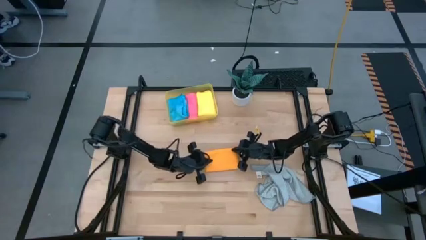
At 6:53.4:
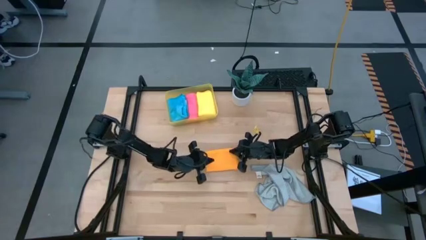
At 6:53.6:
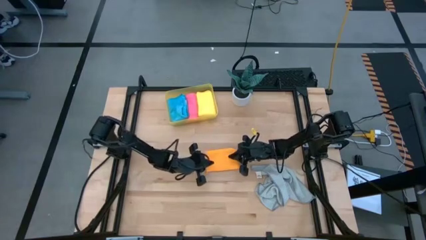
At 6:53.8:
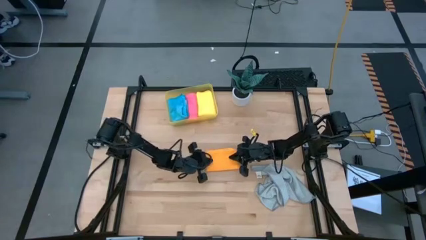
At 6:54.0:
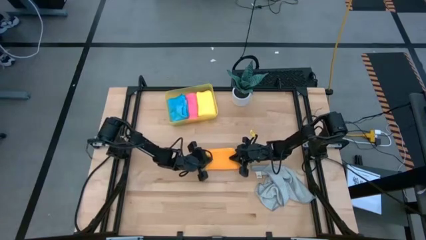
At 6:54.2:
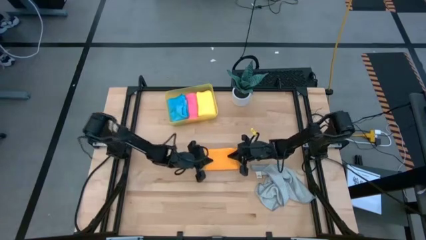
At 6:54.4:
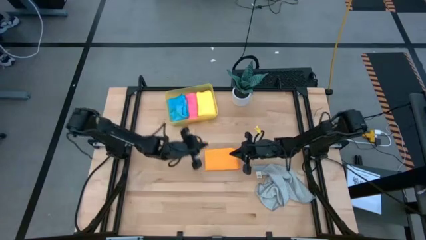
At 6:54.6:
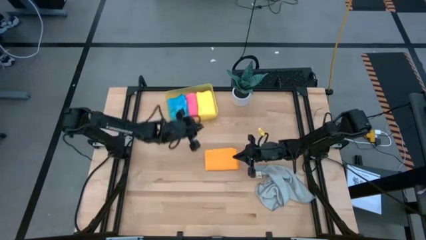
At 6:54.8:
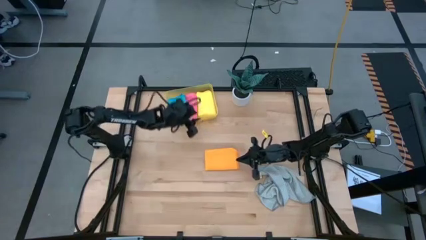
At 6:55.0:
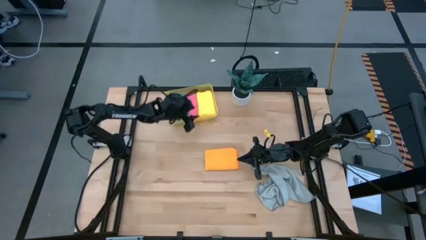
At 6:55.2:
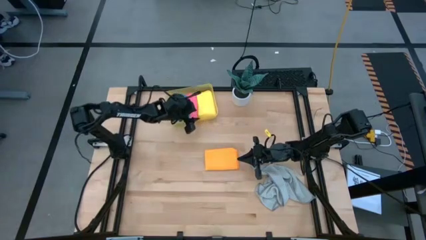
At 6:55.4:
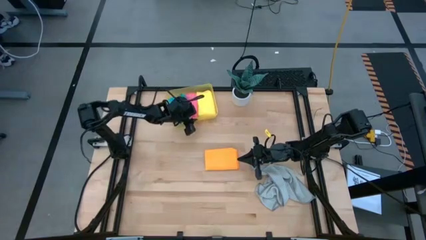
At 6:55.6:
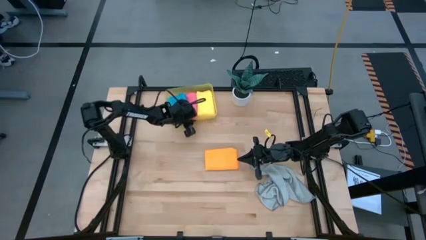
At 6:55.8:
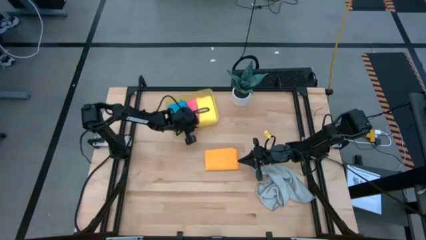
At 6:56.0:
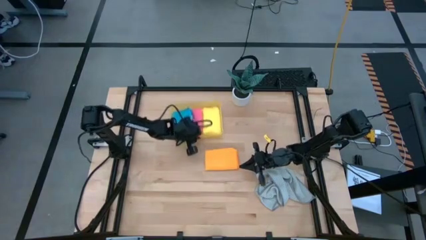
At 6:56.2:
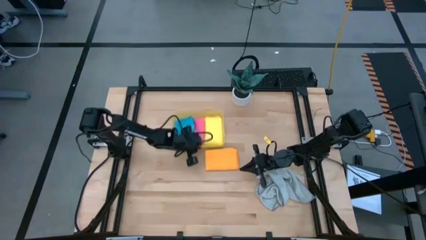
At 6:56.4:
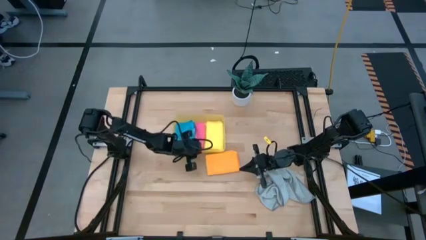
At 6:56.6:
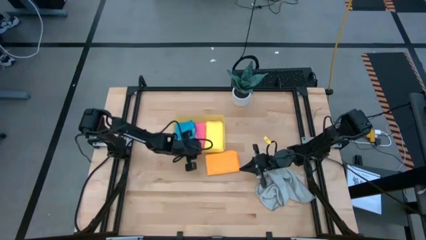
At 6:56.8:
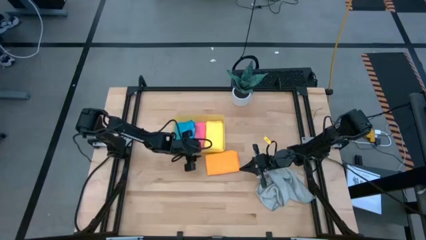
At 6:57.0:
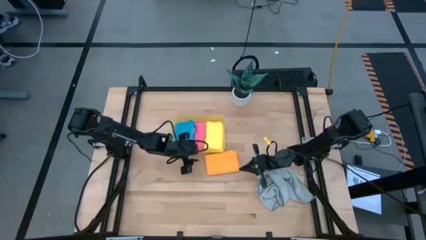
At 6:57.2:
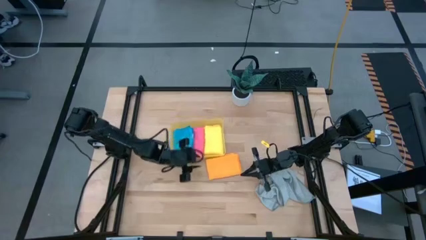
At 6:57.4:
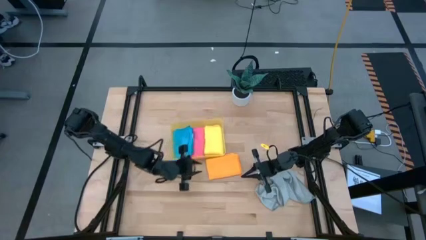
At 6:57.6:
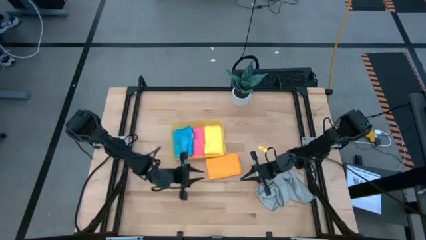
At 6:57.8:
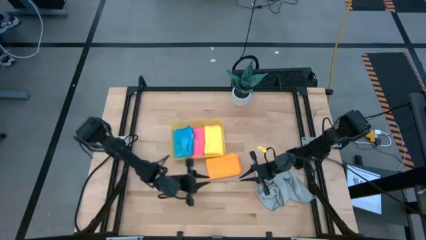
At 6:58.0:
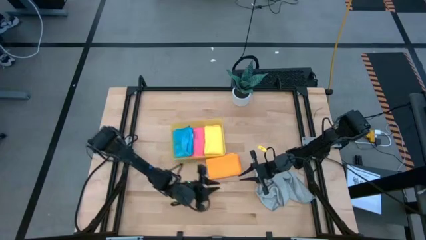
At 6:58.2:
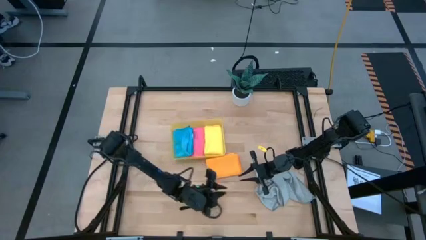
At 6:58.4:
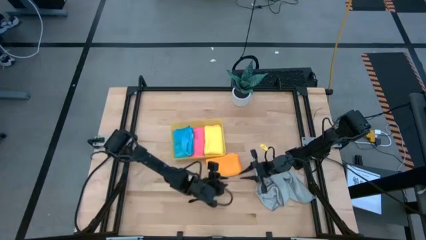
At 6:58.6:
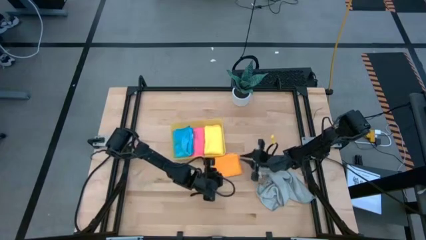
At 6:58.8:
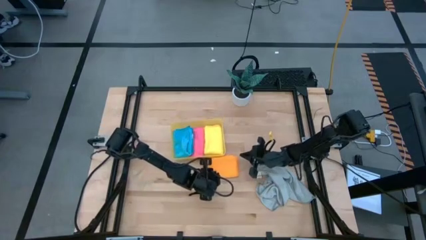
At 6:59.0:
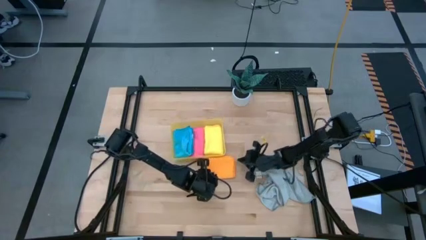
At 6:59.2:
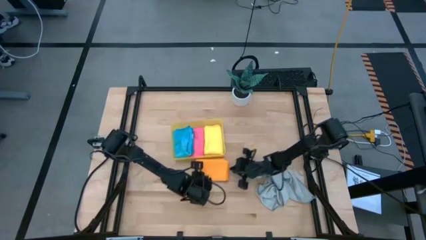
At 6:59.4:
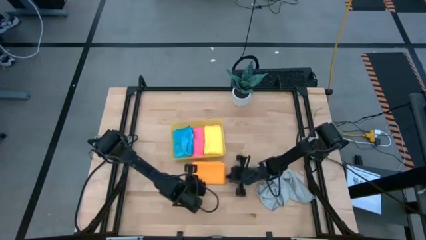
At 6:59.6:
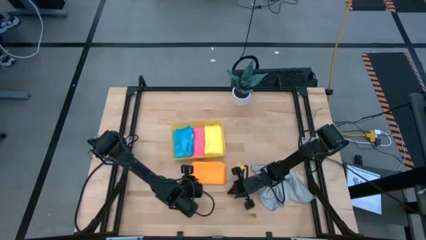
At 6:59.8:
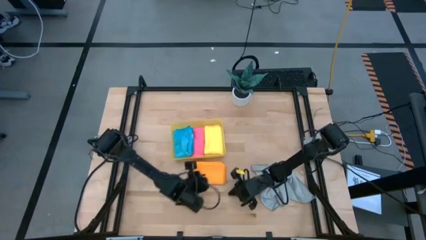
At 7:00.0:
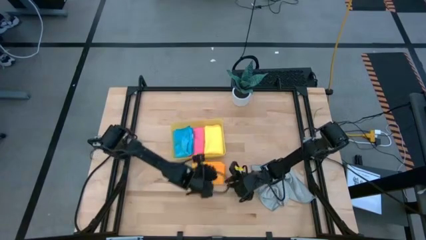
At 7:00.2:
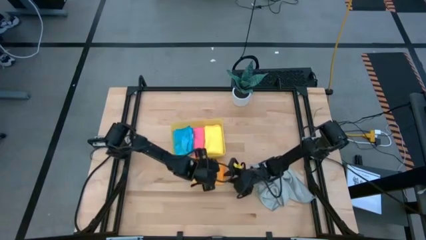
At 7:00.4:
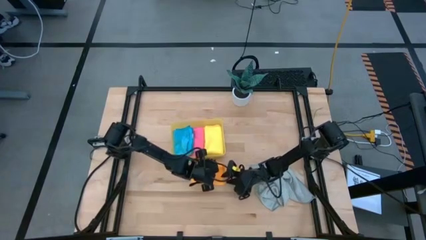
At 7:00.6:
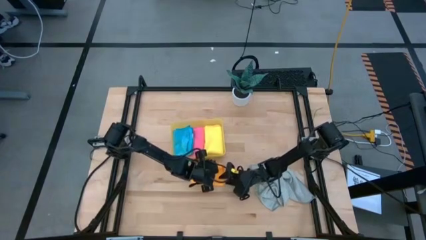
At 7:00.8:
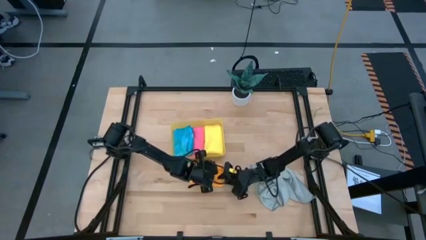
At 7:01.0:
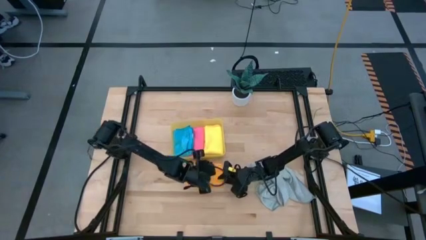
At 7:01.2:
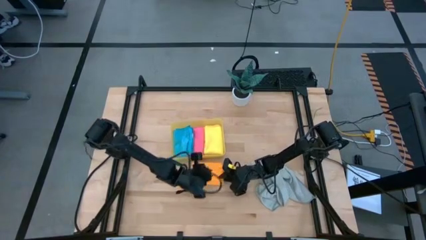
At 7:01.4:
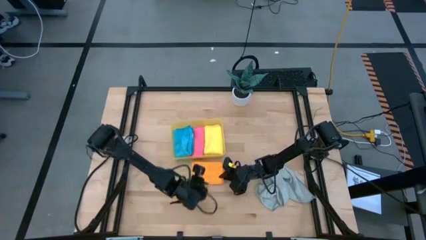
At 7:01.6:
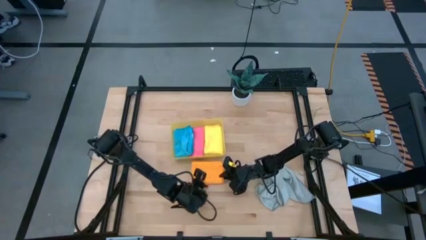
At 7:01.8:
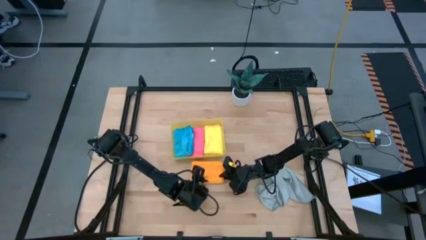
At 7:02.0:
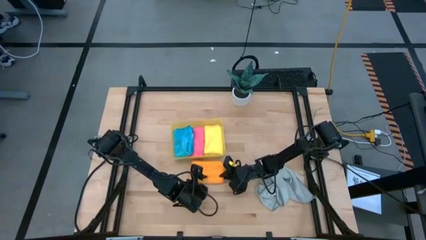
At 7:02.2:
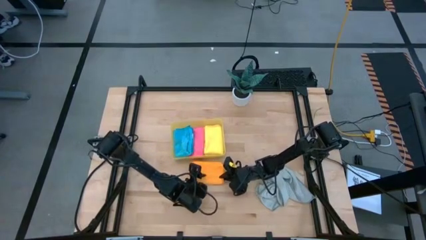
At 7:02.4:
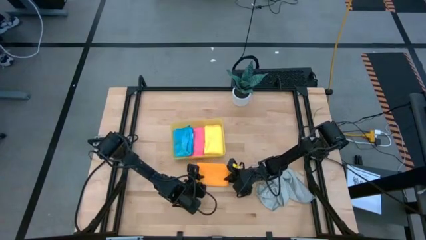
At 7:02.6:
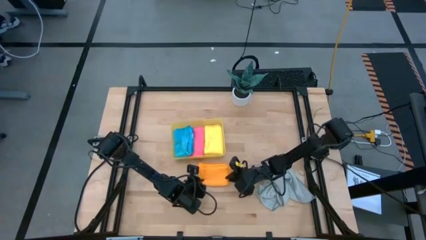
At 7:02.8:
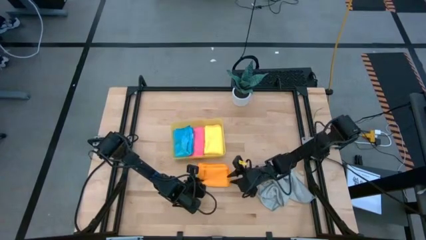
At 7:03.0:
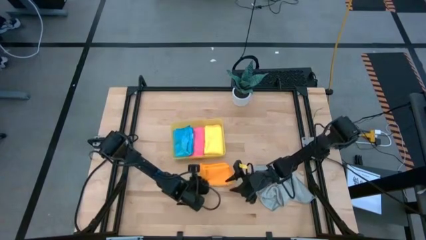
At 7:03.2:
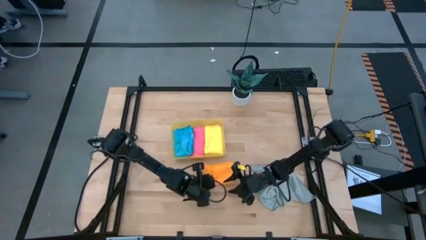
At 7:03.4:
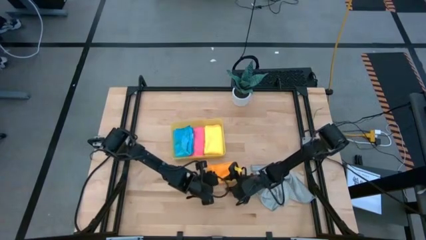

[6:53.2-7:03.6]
Task: Fold microfiber towels
Put the orange microfiber cloth into the yellow bin

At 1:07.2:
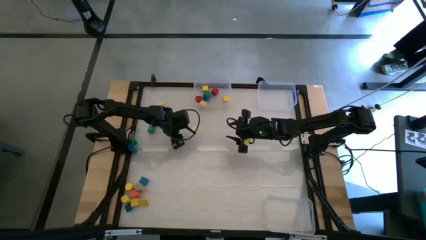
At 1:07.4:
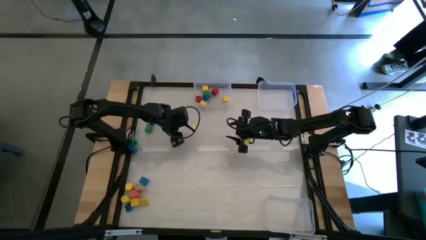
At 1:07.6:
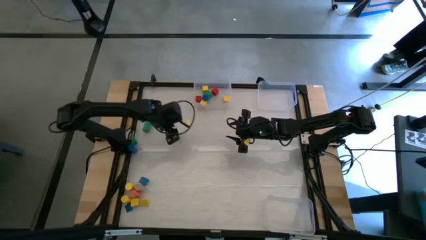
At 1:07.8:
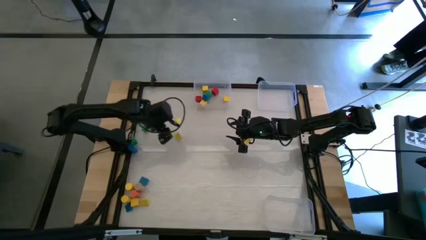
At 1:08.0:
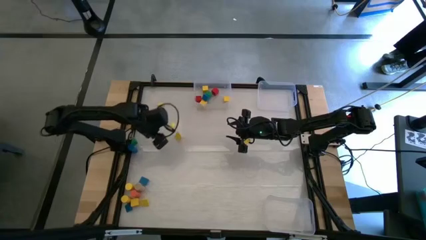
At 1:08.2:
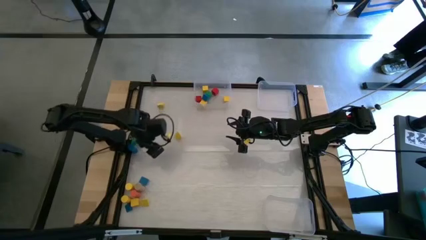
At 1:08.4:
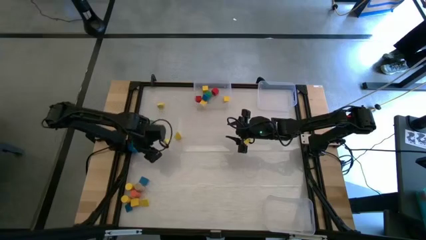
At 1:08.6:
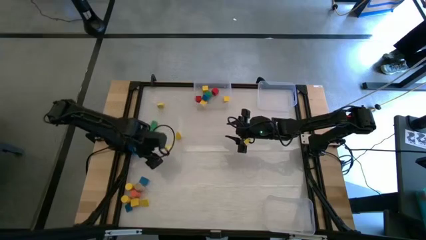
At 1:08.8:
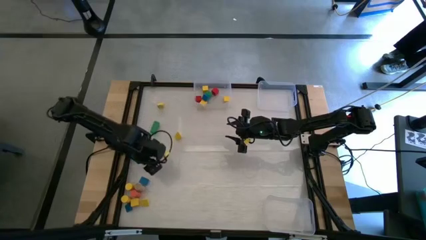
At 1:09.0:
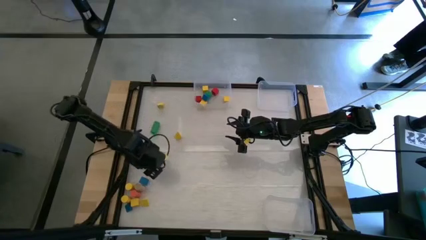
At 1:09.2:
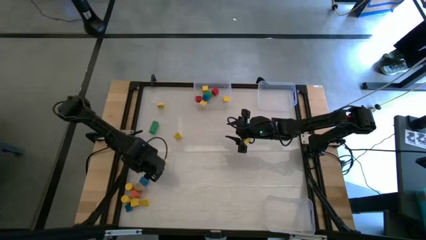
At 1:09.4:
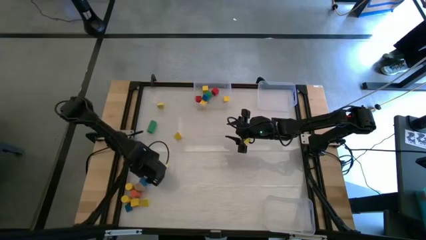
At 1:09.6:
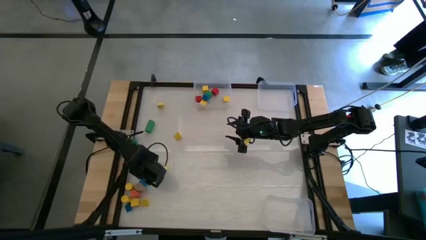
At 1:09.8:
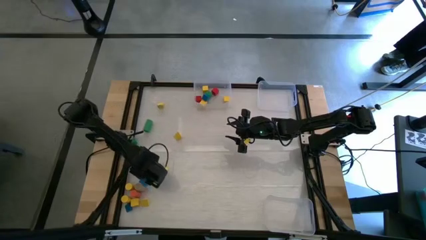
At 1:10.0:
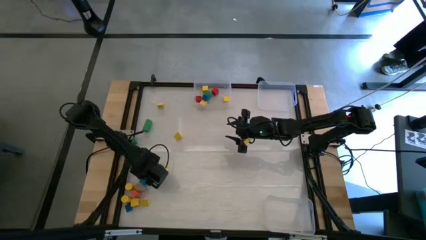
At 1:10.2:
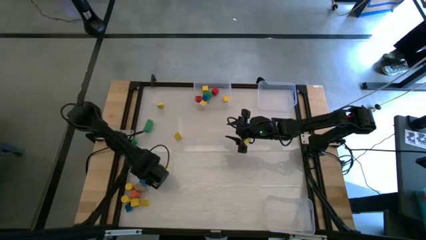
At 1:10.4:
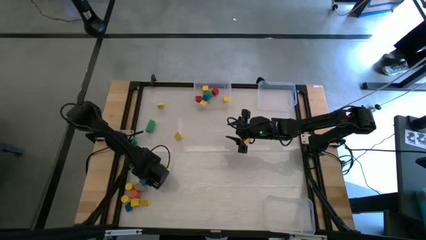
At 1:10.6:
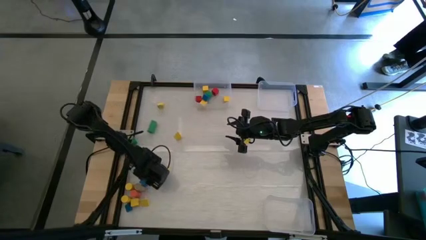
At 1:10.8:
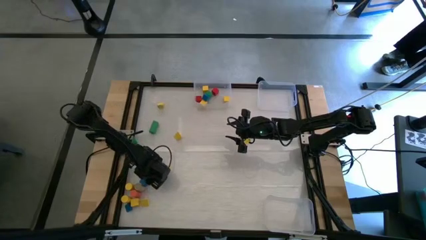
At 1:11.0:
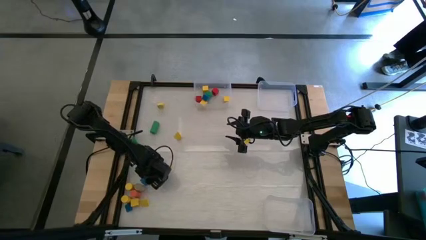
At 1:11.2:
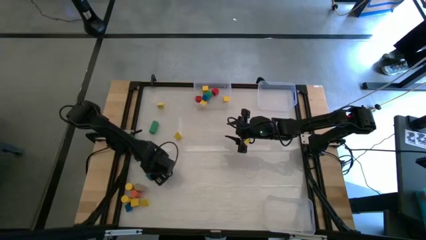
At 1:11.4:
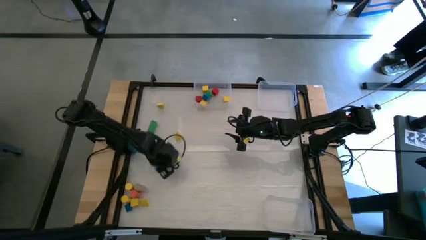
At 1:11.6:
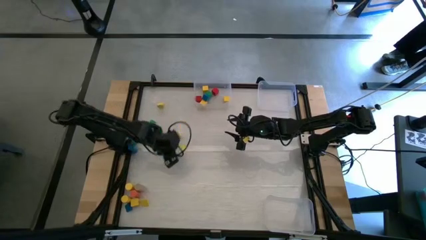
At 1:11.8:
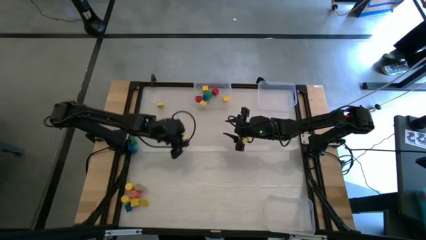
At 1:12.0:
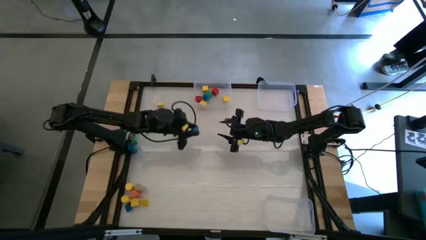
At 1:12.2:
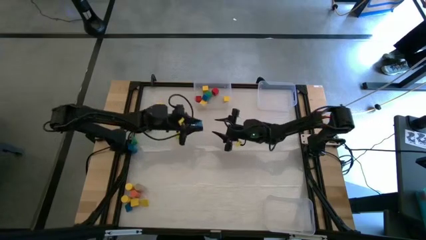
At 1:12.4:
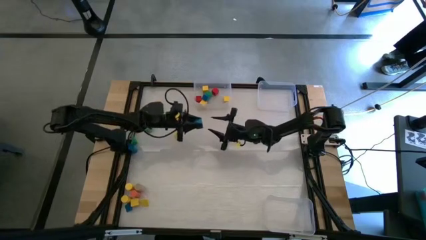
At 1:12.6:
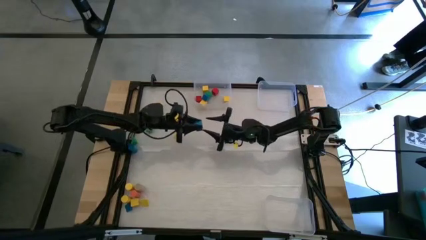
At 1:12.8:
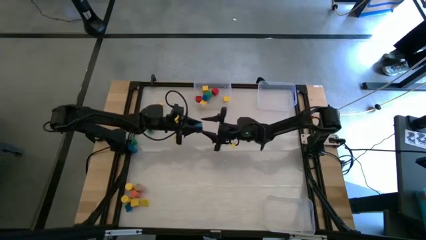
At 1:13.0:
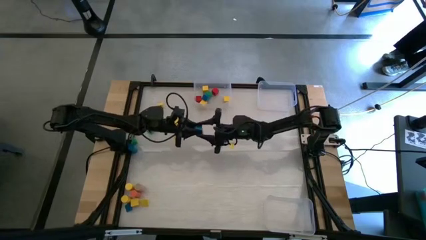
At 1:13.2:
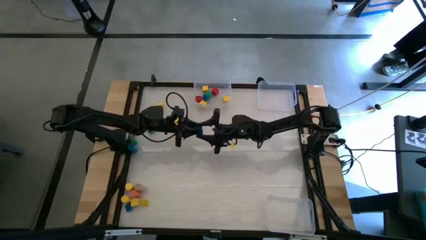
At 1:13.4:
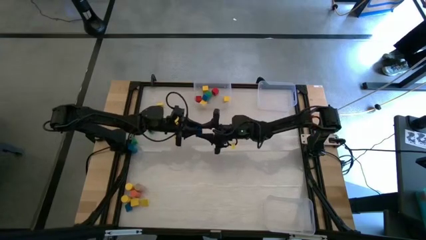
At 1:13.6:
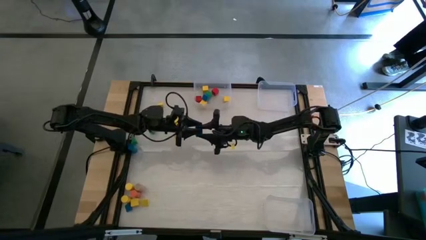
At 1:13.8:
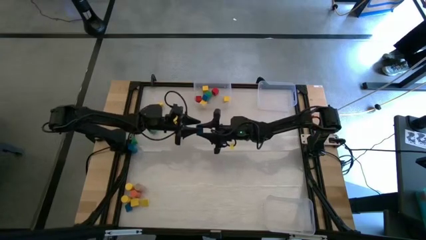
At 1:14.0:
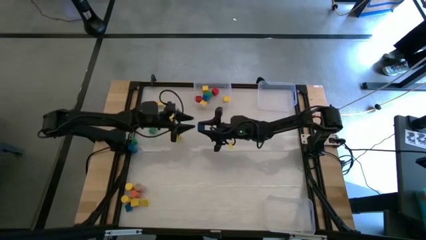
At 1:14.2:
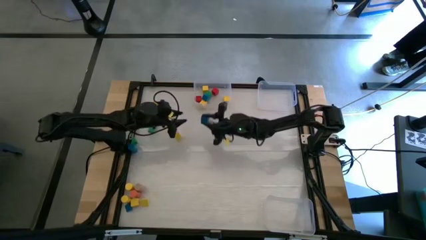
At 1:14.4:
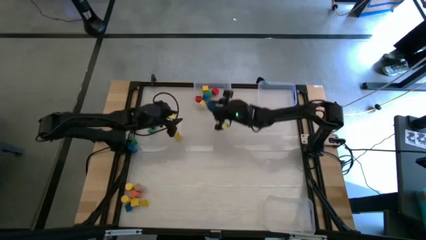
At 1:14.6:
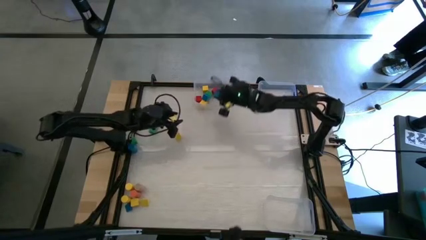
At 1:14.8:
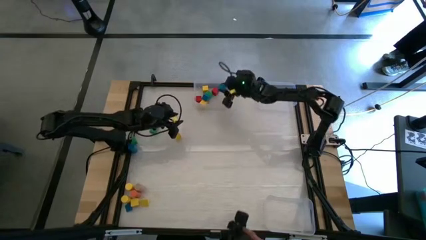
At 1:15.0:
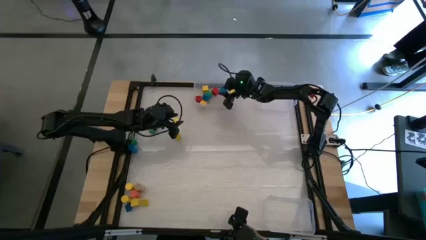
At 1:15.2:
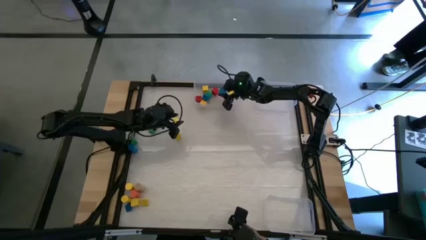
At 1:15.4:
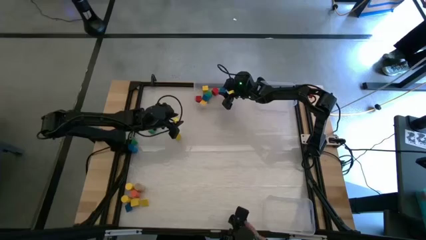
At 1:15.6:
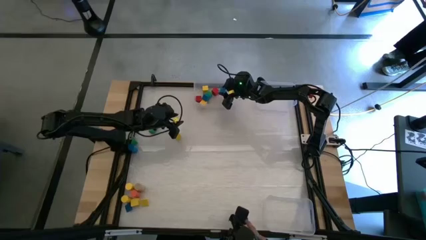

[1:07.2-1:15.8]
Task: Sort blocks by size
Put the square blue block into the top left transparent bin
